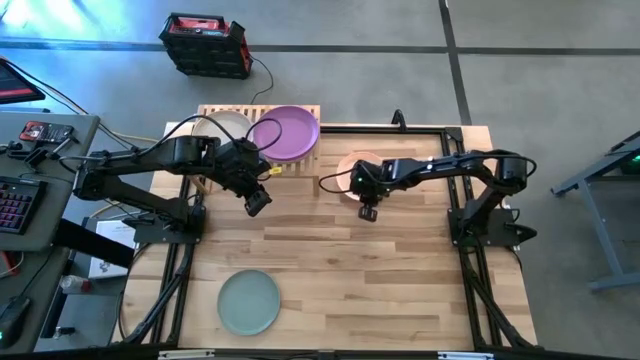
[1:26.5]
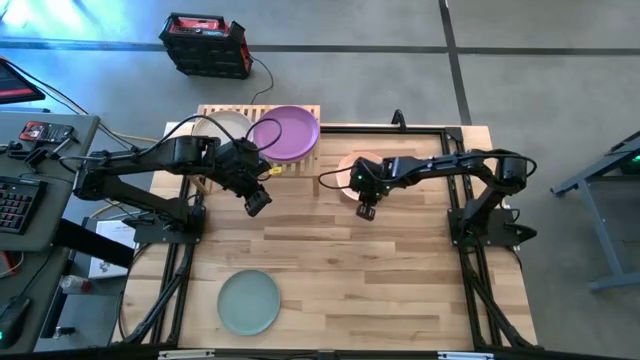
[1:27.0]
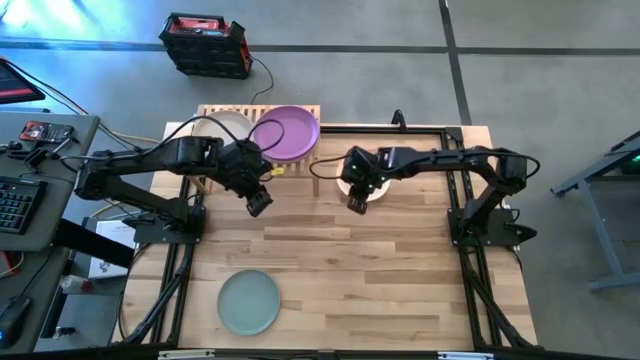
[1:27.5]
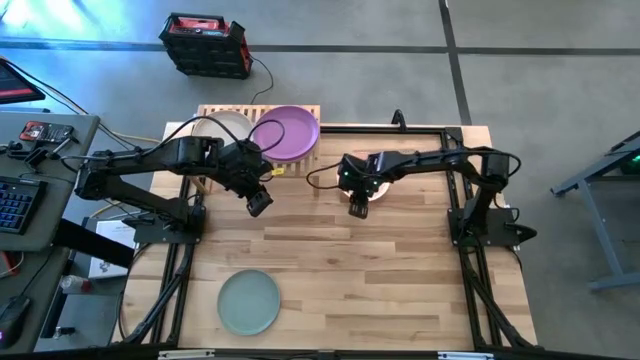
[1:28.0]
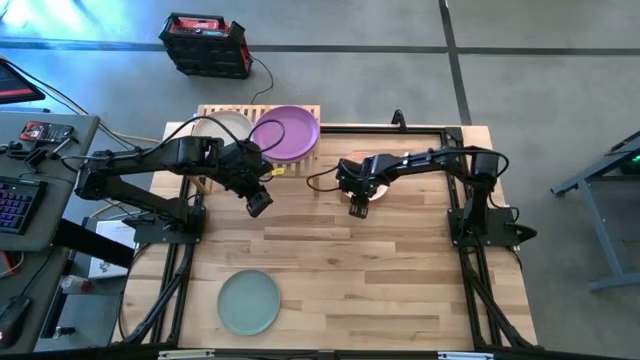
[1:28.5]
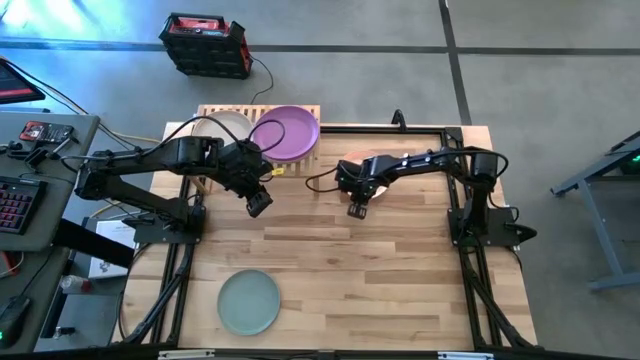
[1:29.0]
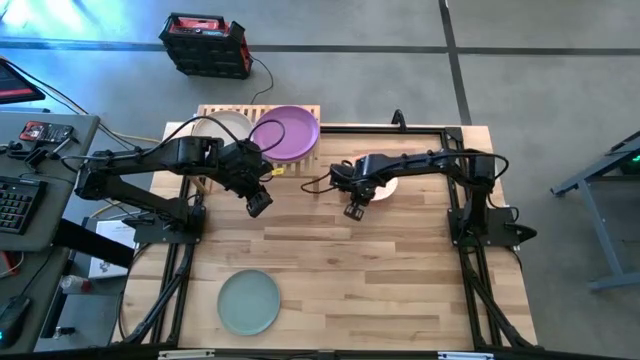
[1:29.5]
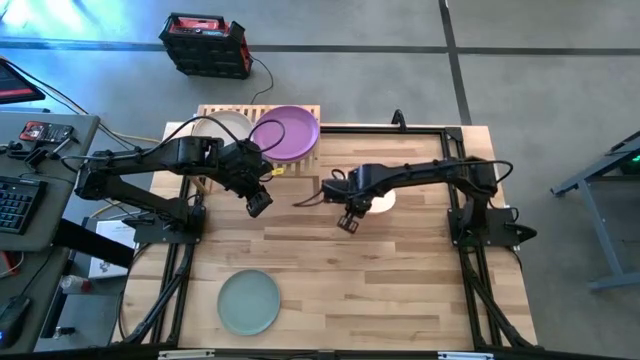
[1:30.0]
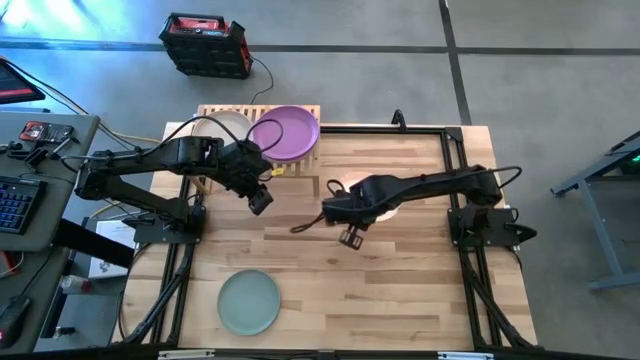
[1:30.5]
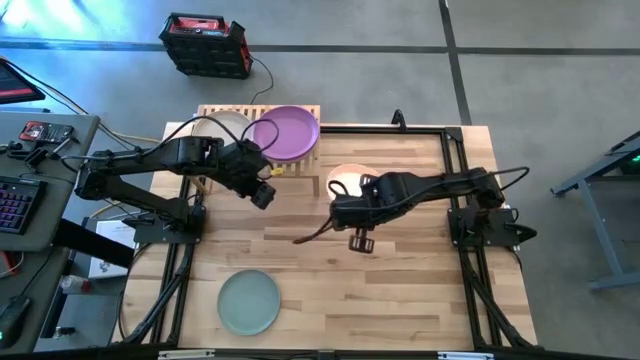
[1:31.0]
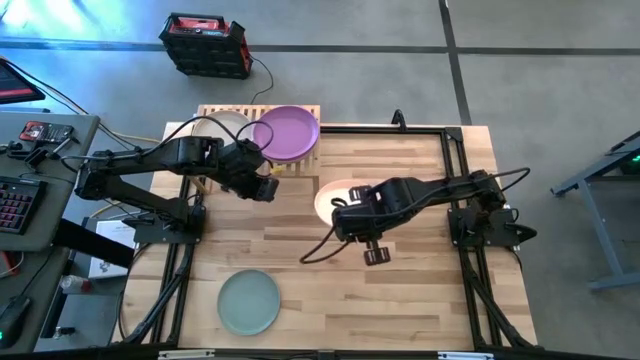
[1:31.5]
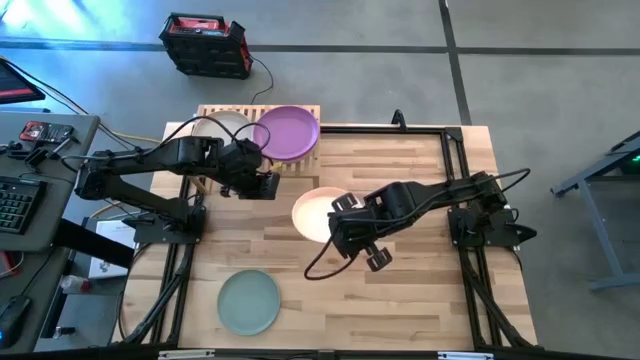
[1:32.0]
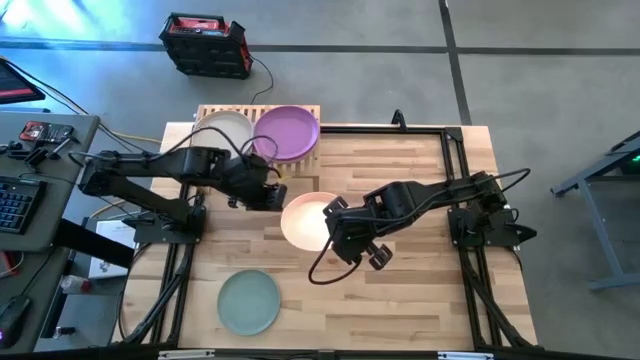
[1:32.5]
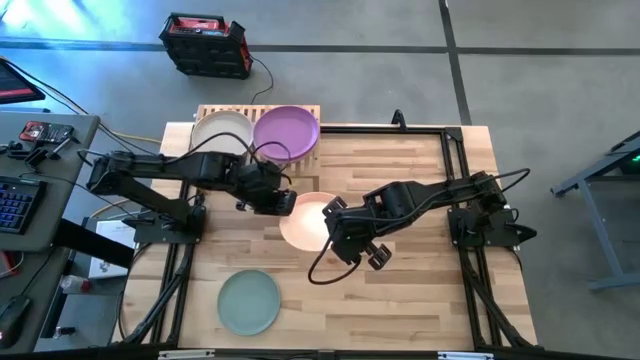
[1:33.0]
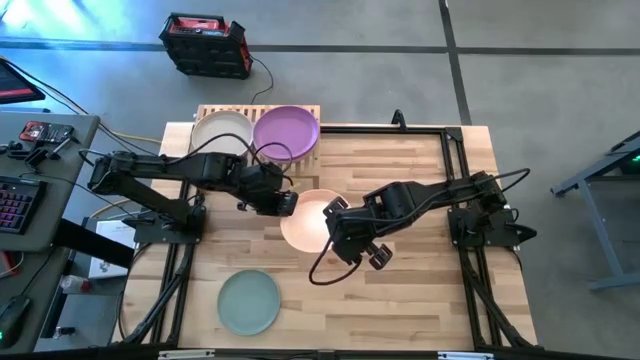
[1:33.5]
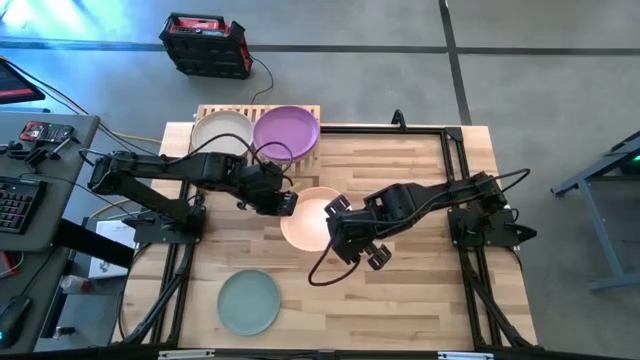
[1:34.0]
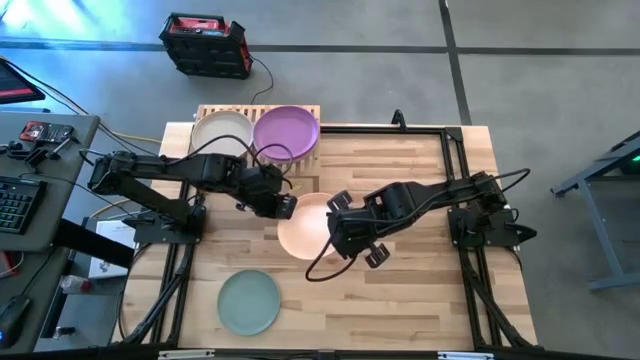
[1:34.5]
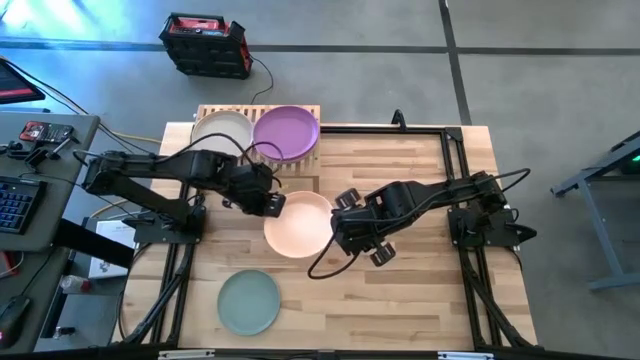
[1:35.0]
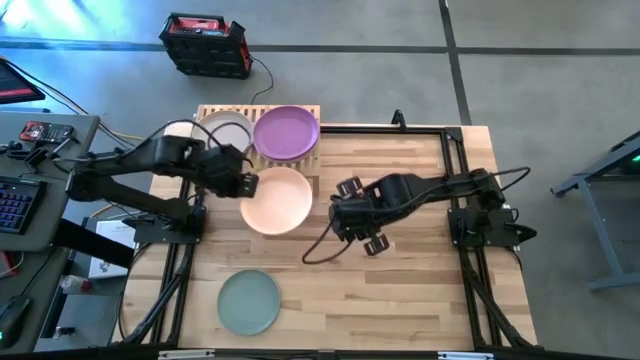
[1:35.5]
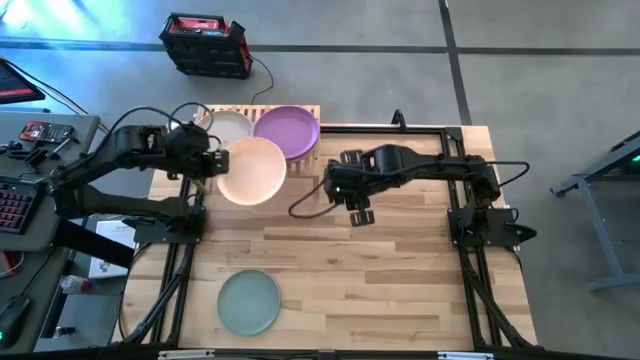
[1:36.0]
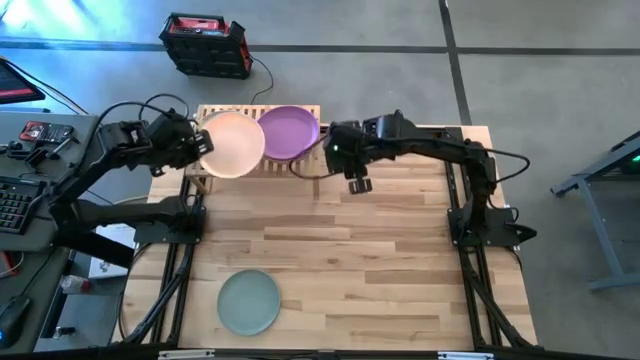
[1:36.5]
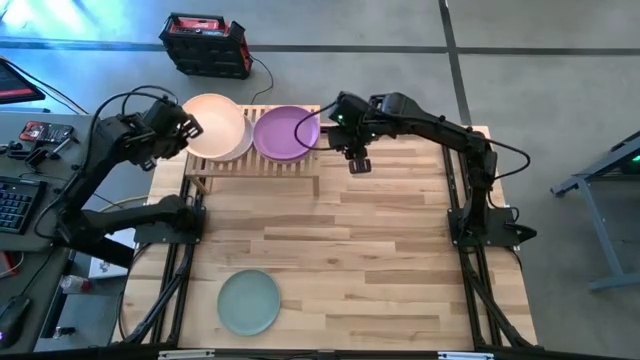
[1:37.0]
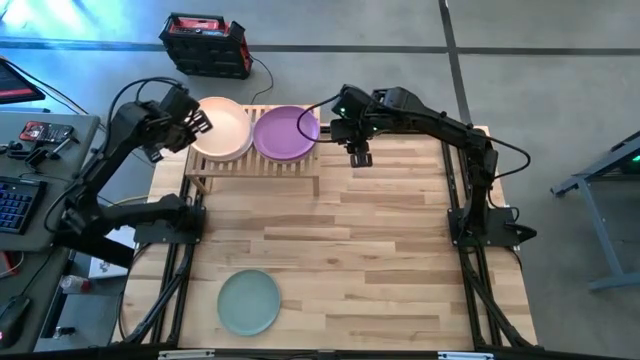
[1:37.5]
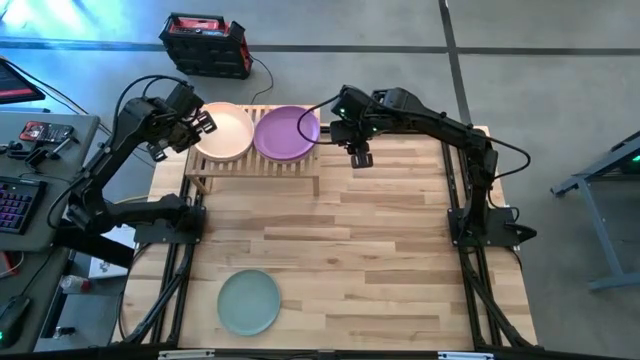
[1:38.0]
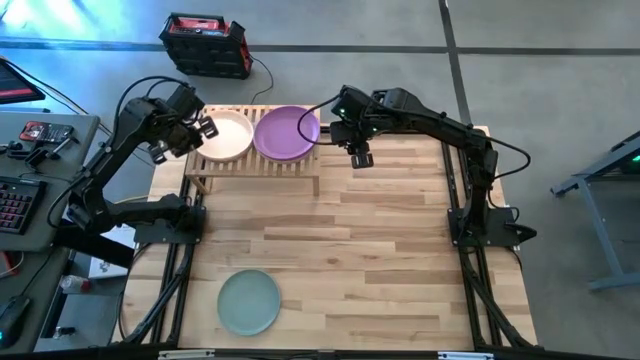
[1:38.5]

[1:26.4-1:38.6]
Task: Place and stack plates onto a shelf
Stack the light brown plate on top of the gray plate on the shelf

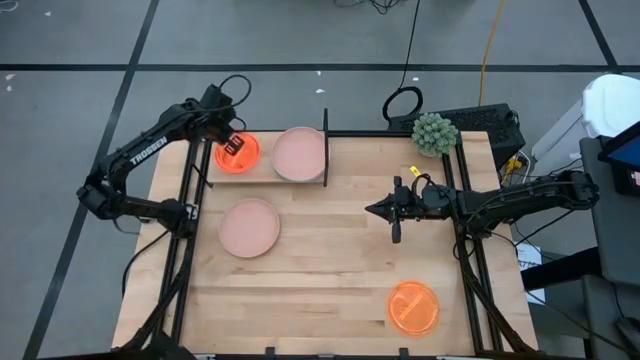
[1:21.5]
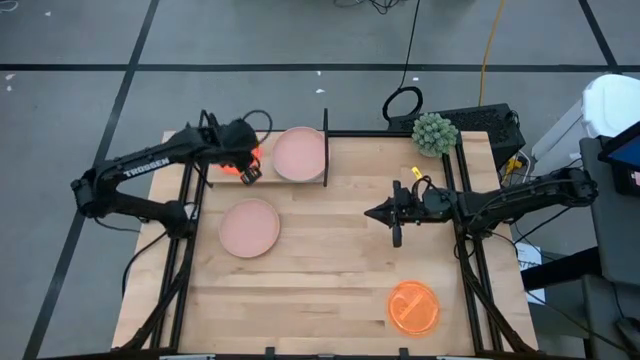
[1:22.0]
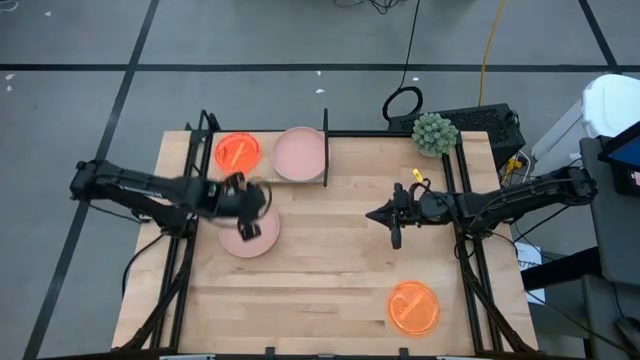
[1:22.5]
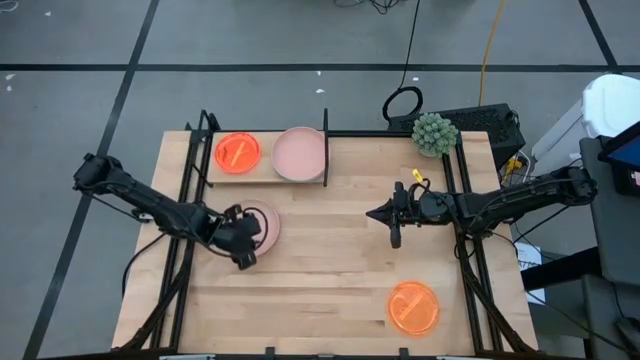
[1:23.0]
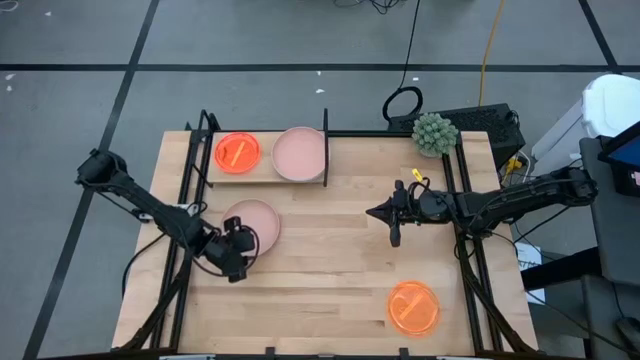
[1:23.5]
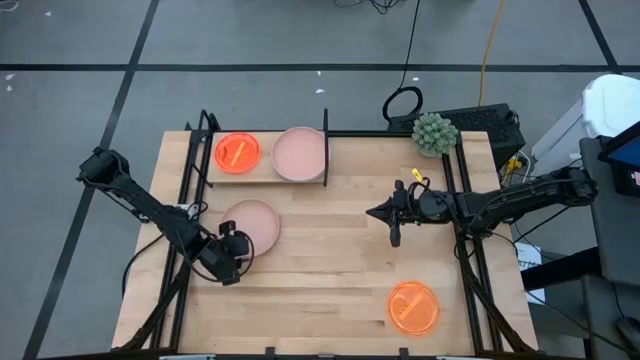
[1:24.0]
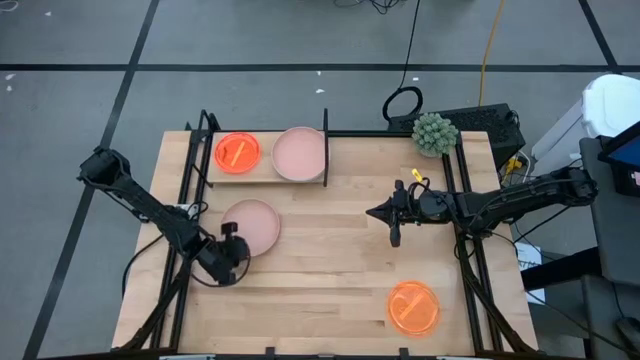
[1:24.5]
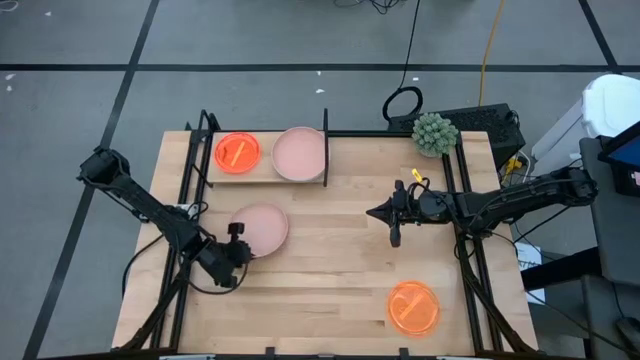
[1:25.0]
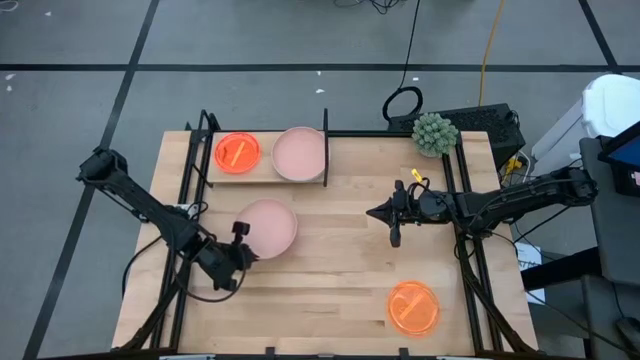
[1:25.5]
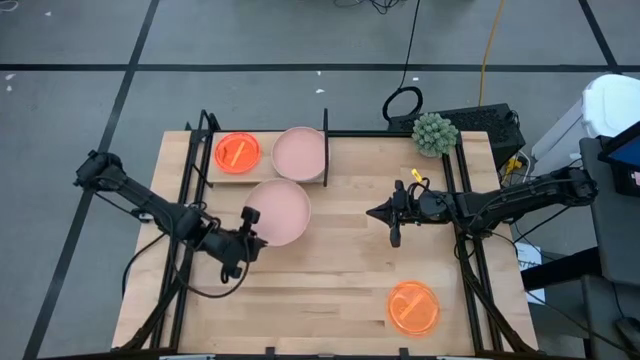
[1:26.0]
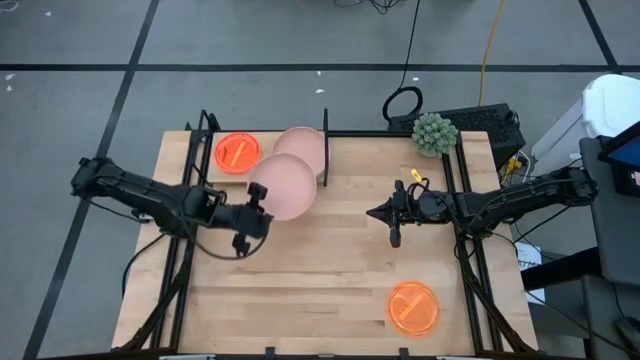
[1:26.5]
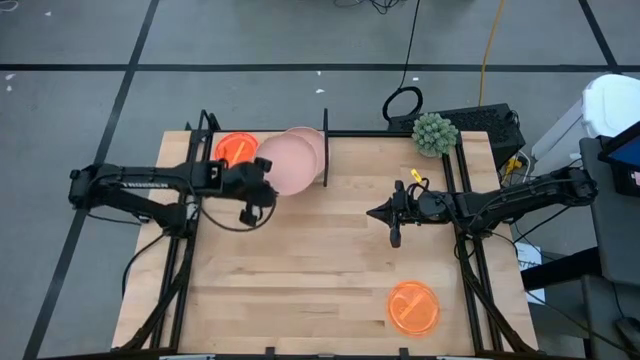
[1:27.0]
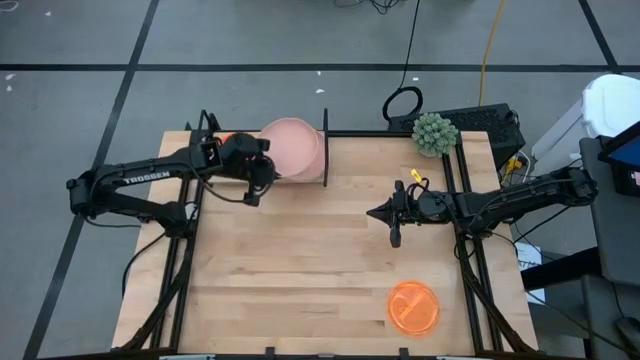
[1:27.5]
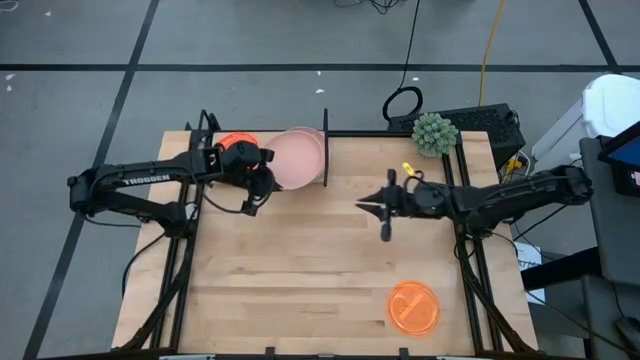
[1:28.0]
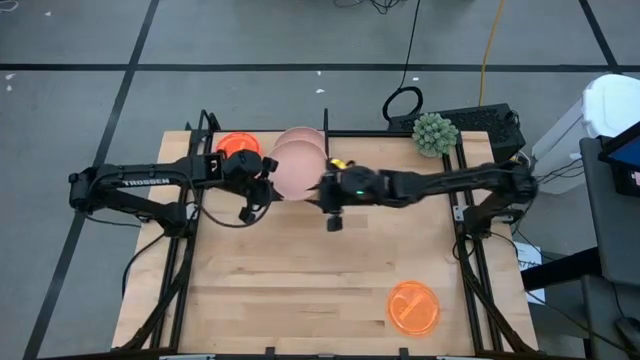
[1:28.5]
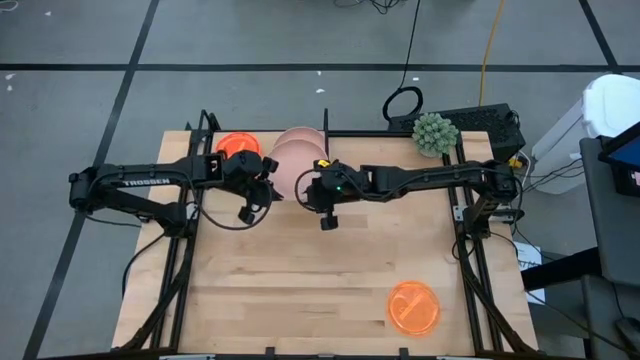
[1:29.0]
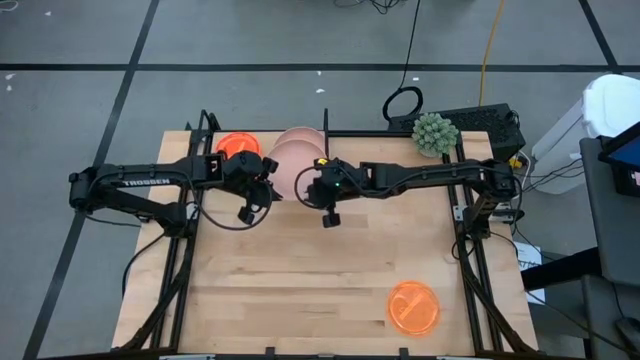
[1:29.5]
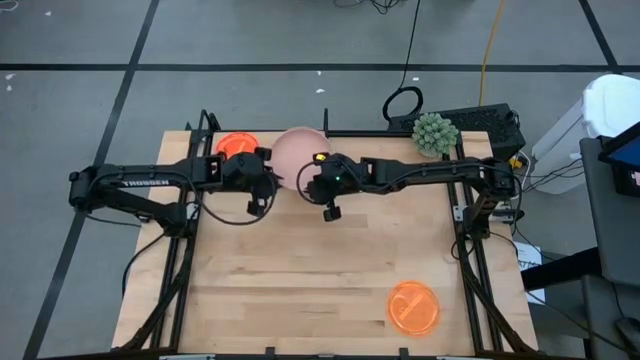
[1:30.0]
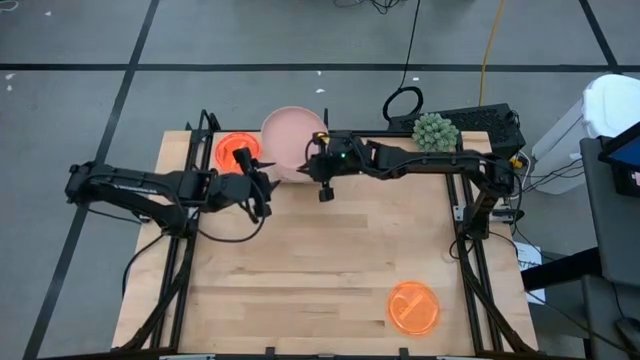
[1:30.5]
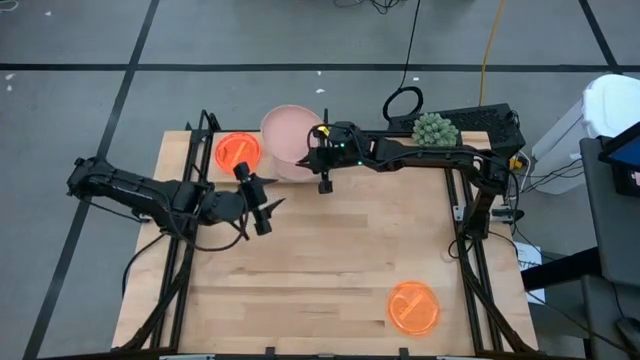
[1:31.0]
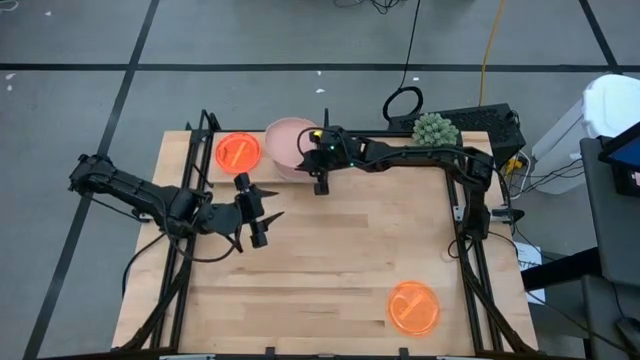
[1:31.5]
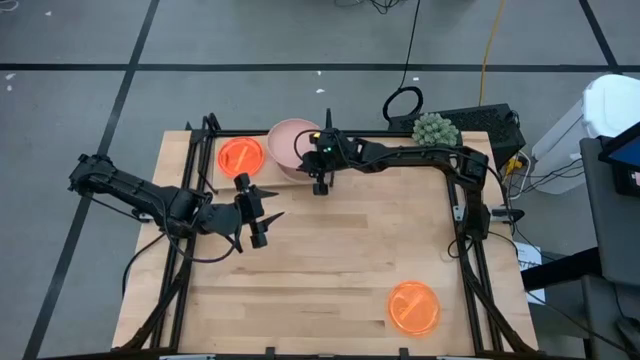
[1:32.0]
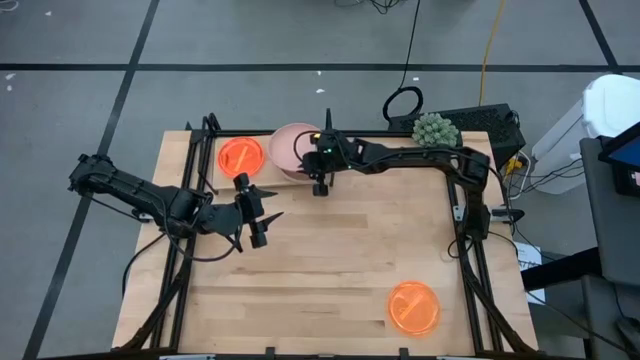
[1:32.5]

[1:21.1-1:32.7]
Task: Place and stack plates onto a shelf
Stack the pink plate on top of the pink plate on the shelf
